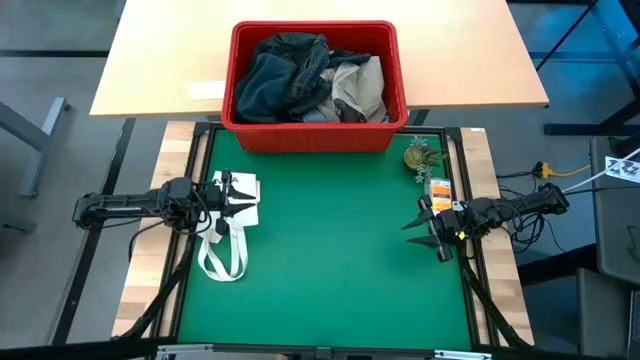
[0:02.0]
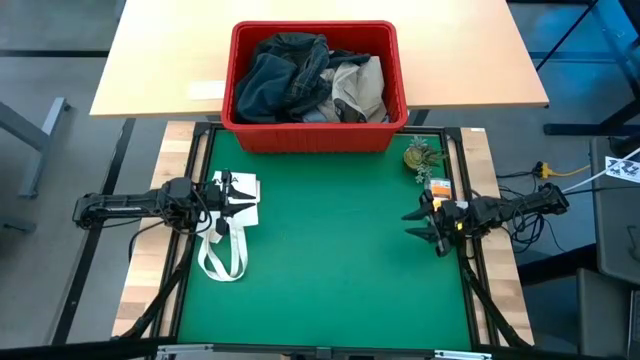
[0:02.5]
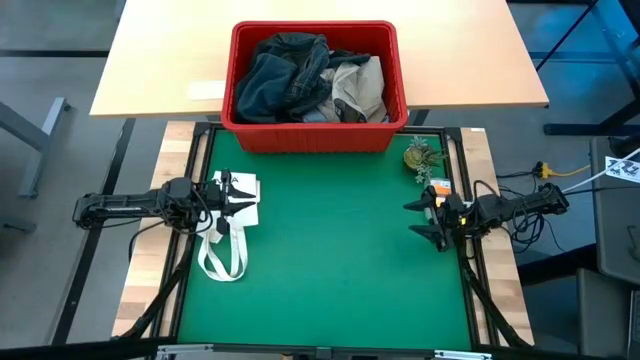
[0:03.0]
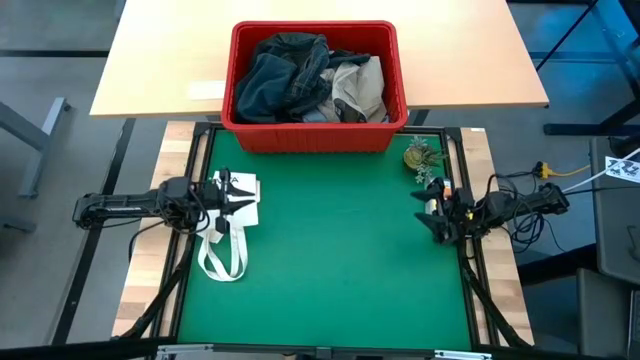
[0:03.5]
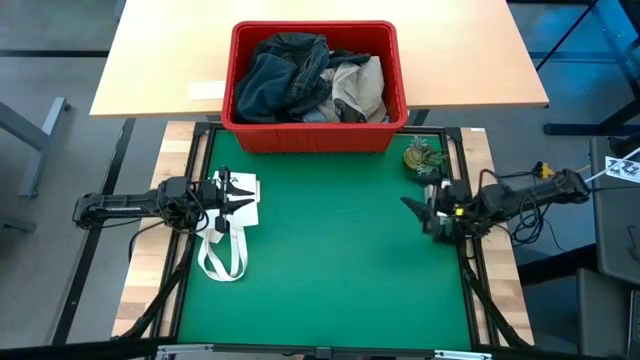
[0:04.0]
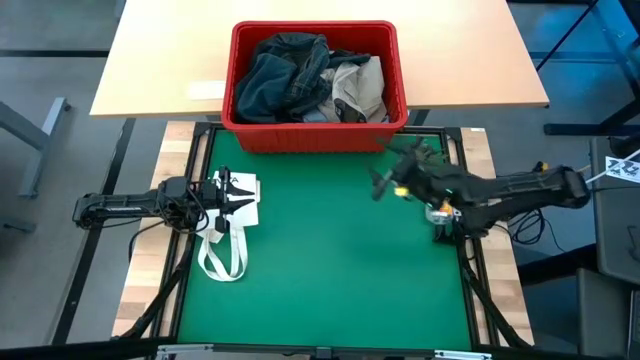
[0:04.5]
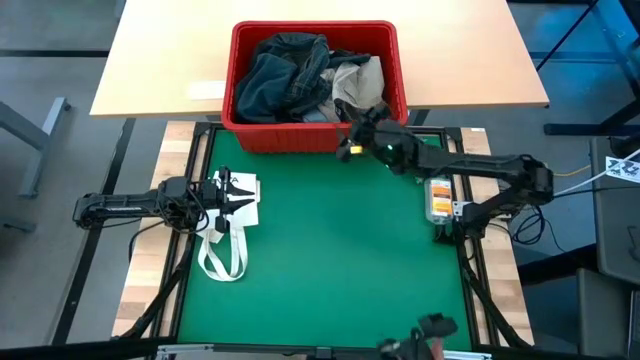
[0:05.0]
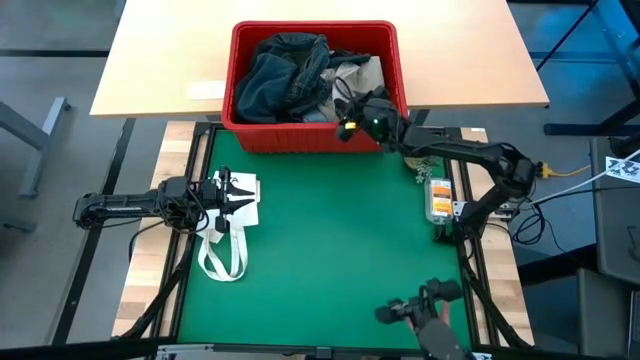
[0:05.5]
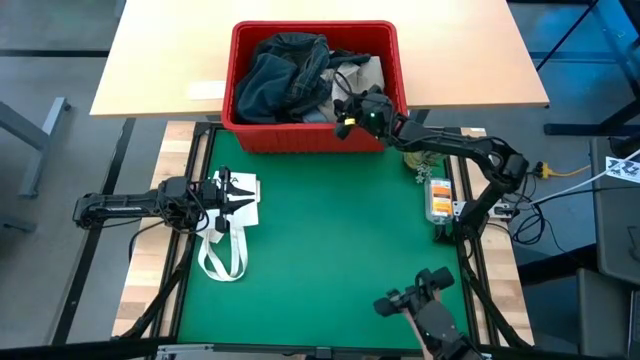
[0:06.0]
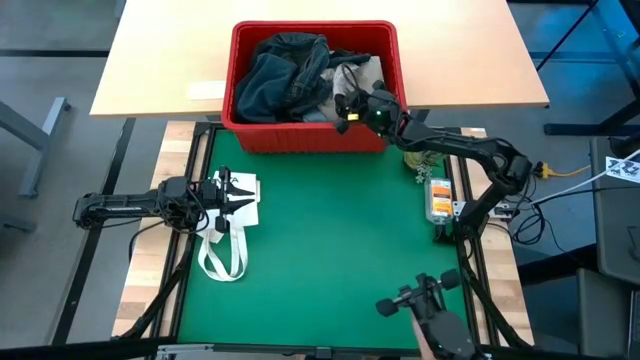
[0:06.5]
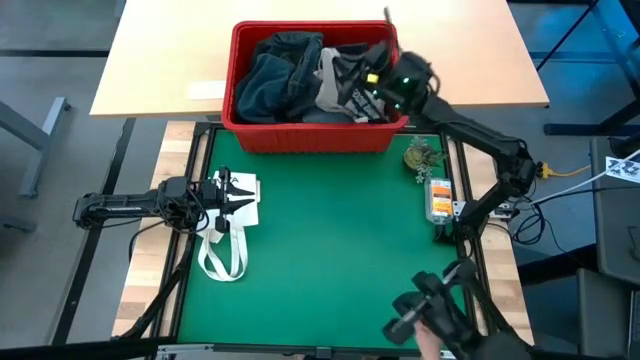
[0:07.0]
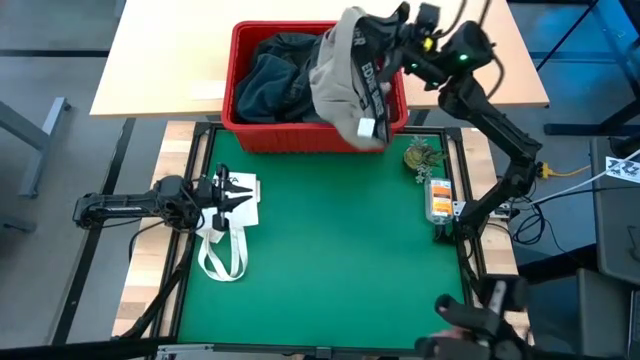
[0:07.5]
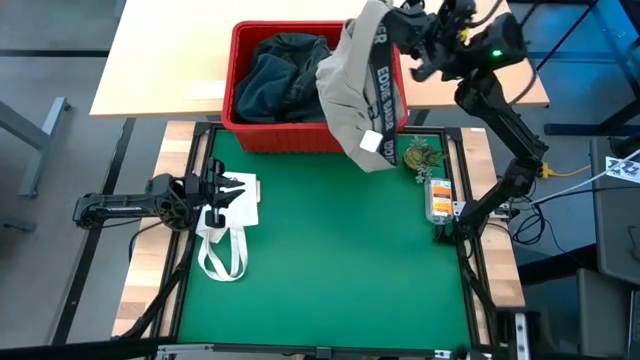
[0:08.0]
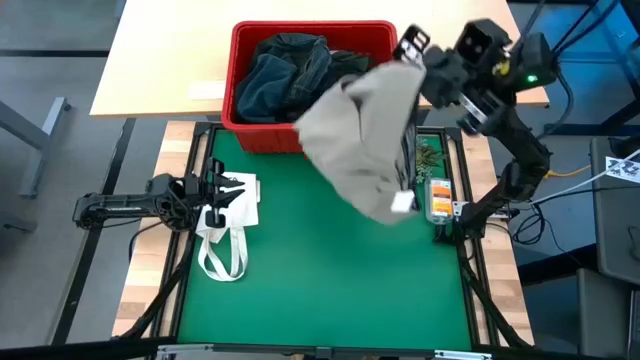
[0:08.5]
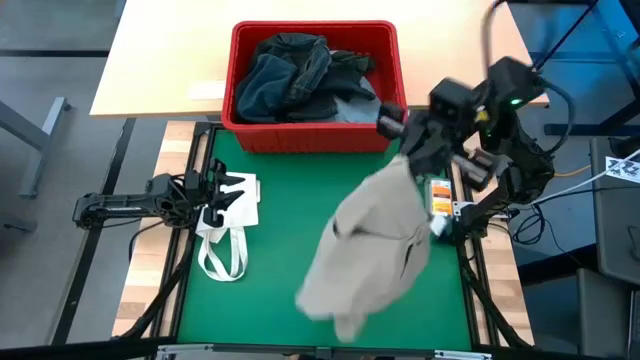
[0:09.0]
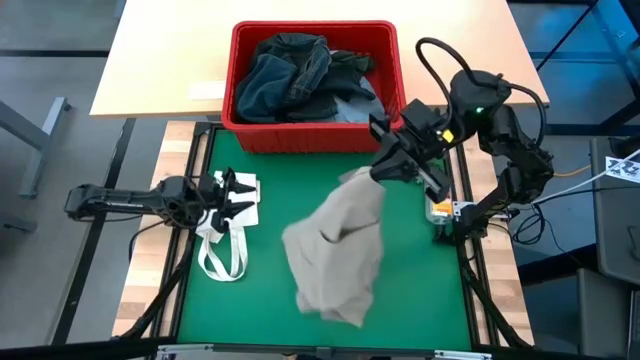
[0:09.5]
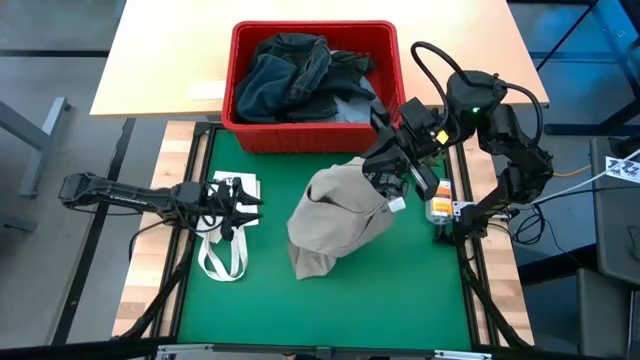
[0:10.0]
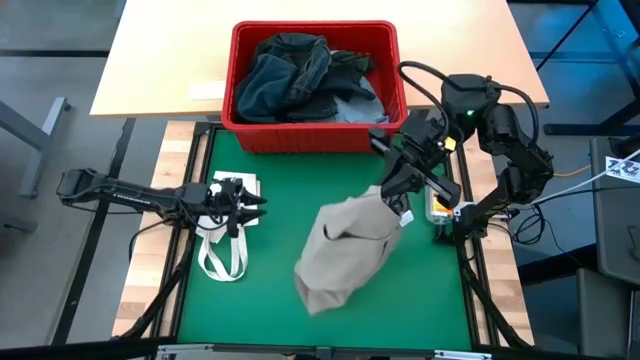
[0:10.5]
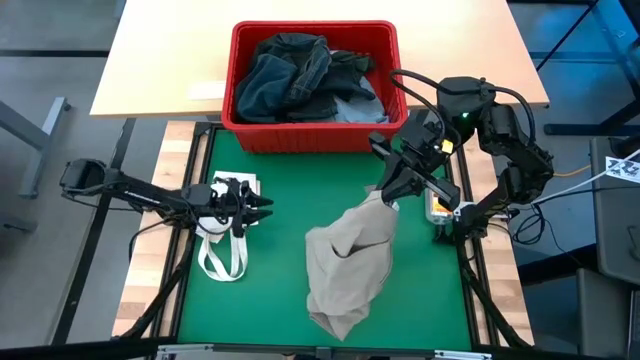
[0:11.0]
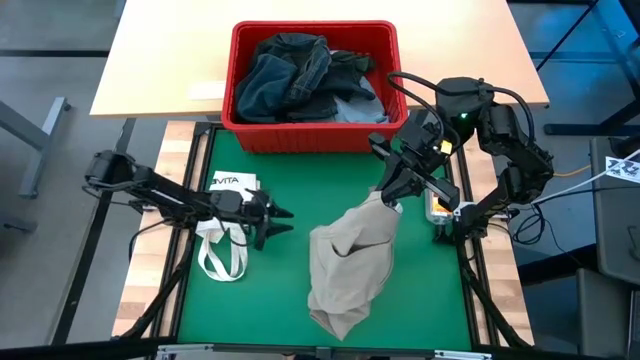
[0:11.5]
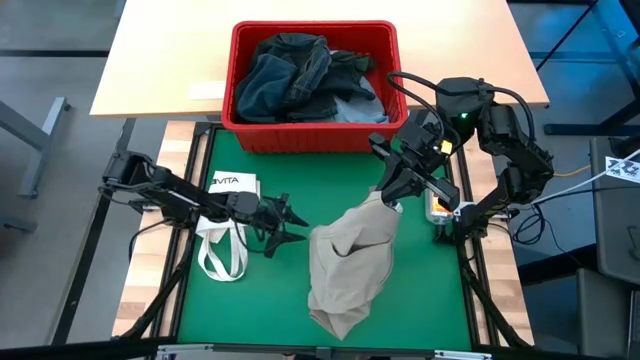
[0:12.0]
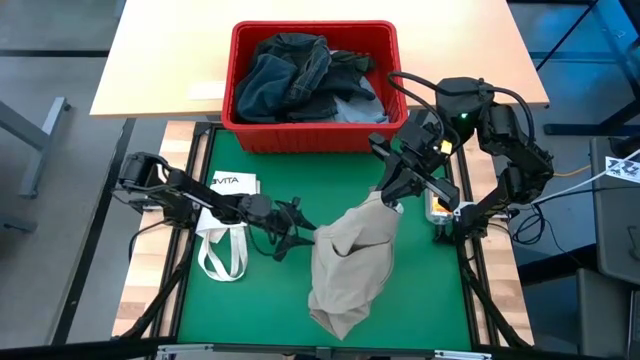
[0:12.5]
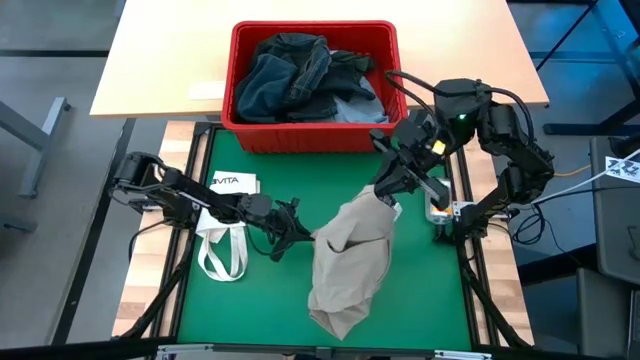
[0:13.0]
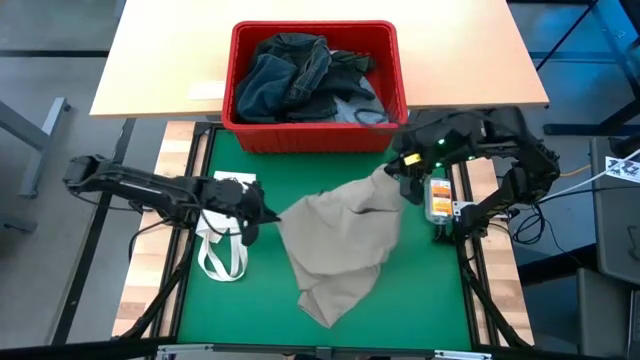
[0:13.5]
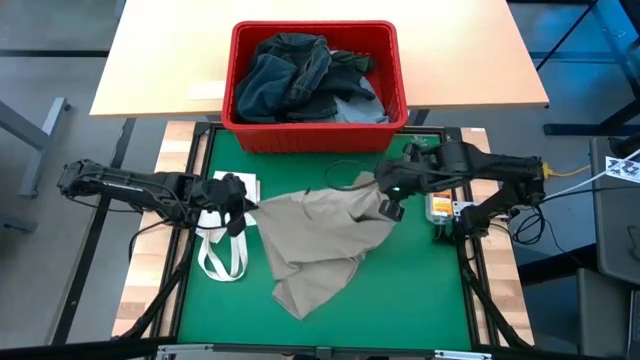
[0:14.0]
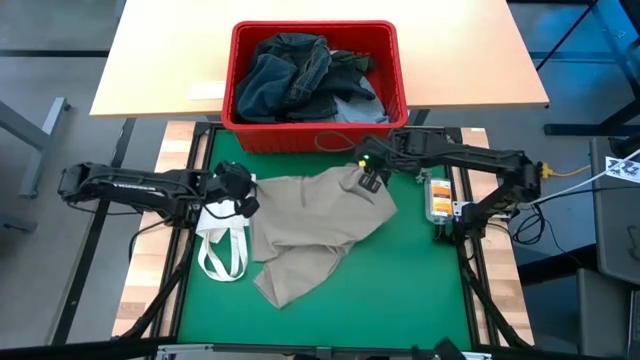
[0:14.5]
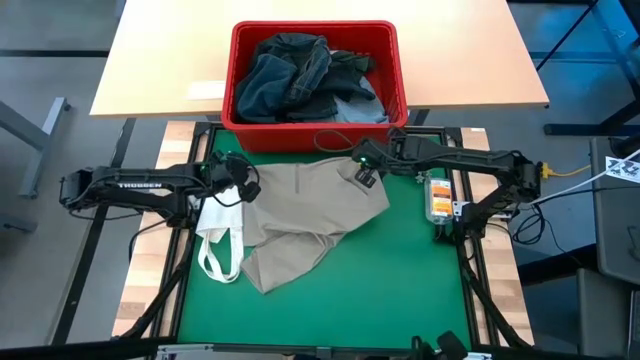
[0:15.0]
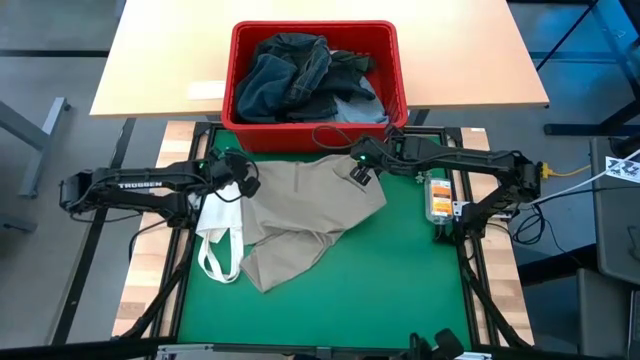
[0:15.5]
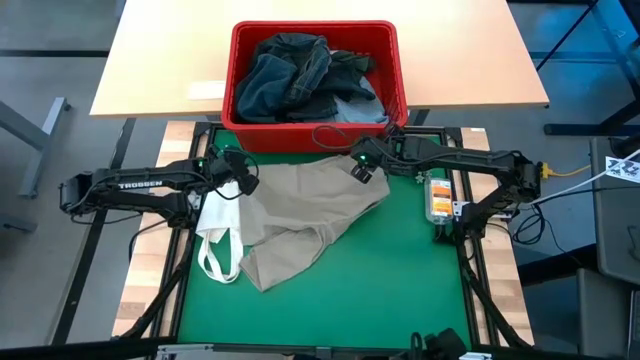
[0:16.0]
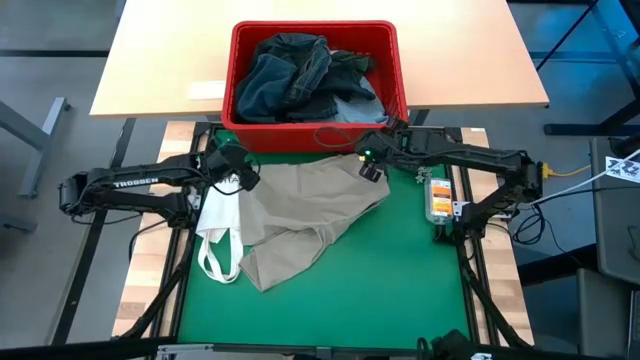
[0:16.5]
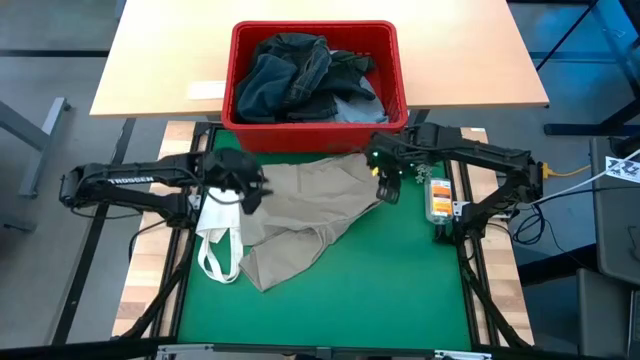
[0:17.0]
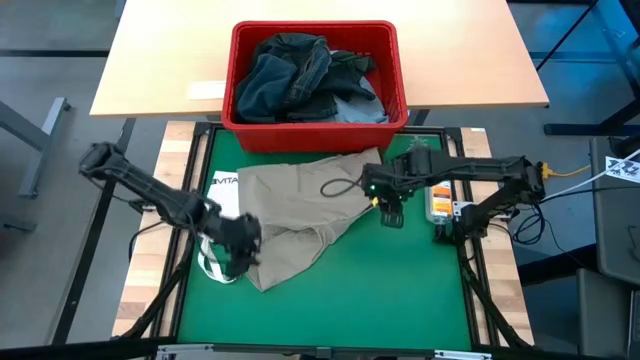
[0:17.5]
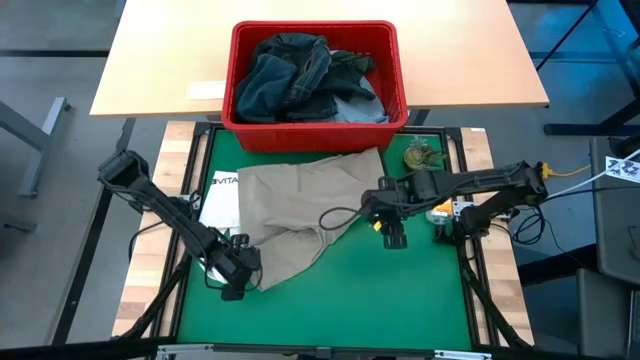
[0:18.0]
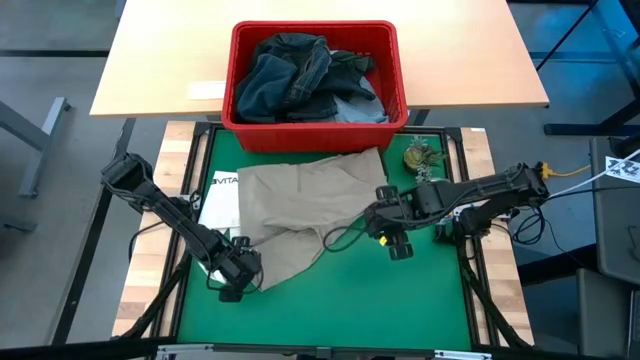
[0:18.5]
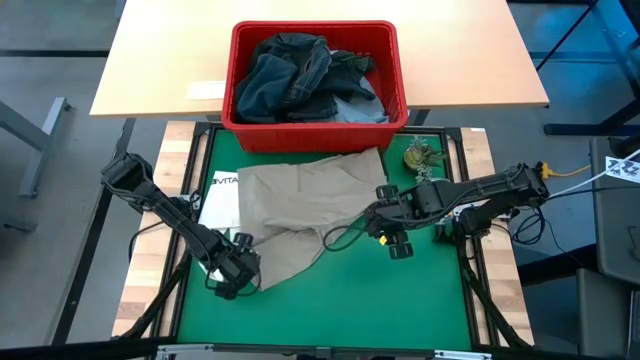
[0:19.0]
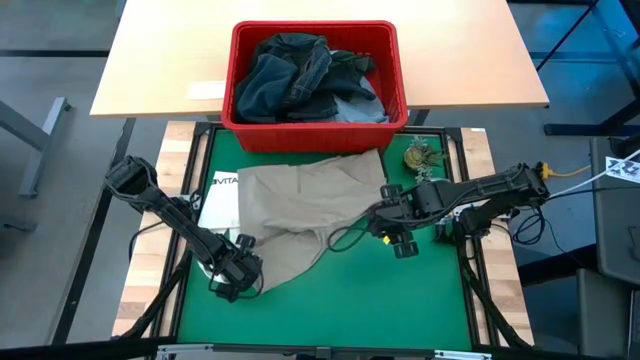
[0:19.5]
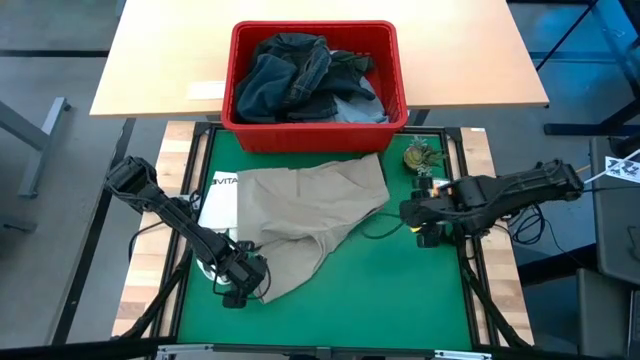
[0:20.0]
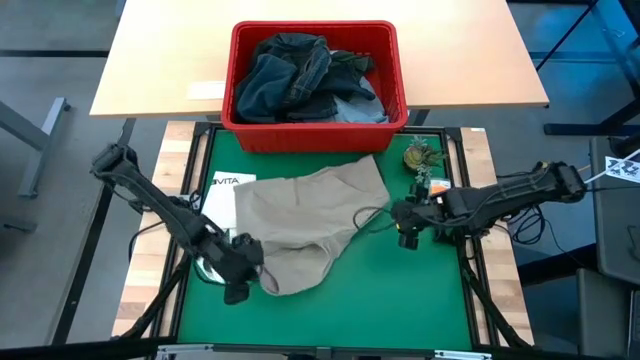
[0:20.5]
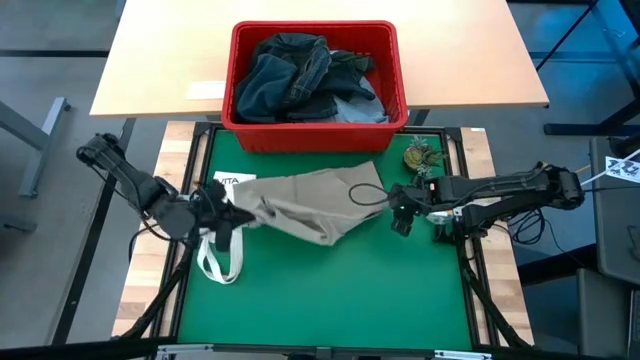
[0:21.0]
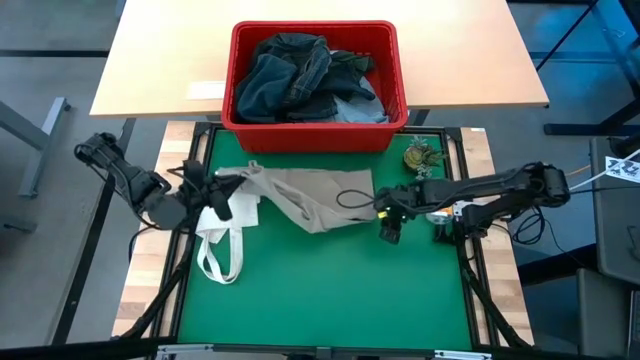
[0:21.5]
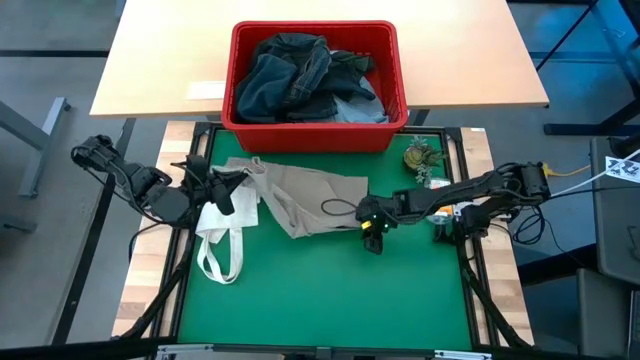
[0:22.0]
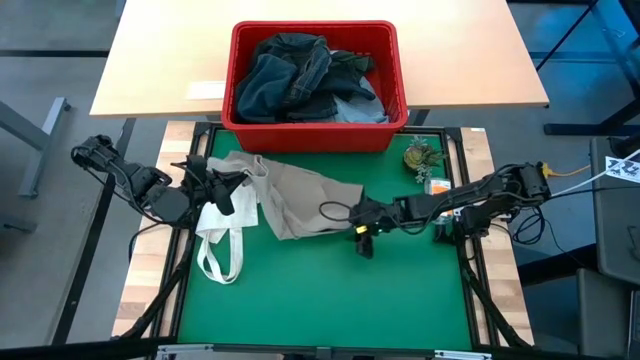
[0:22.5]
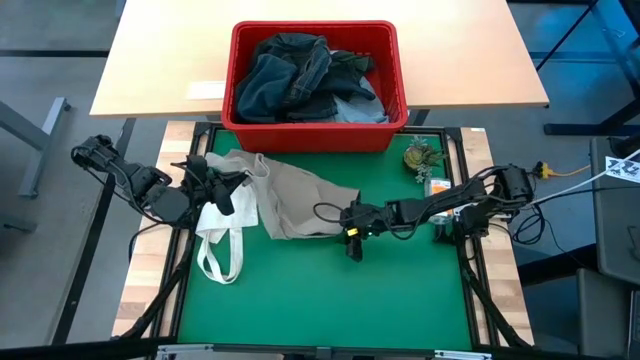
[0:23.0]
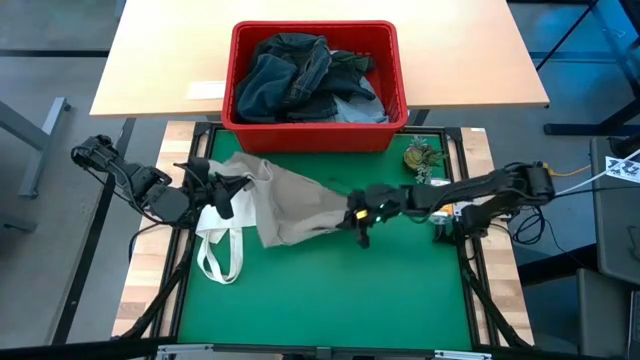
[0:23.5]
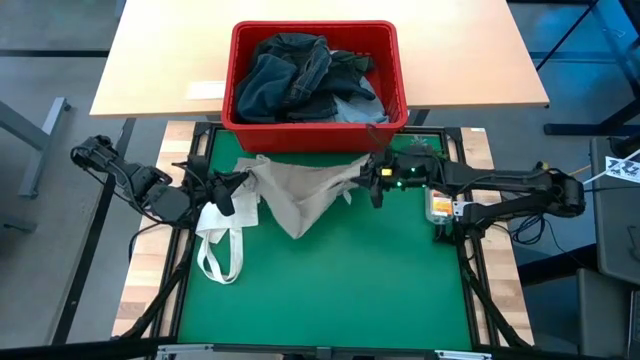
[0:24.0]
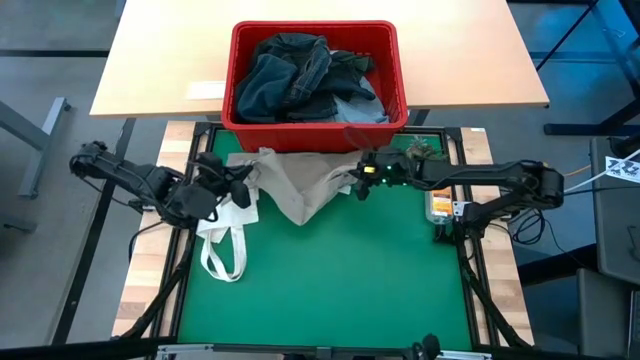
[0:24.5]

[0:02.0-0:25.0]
Task: Fold Laundry from Bin
Fold the gray shorts
